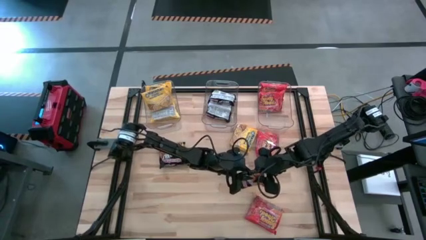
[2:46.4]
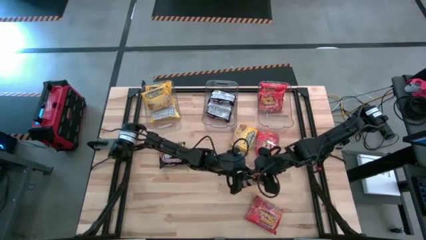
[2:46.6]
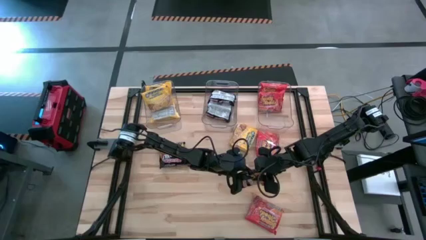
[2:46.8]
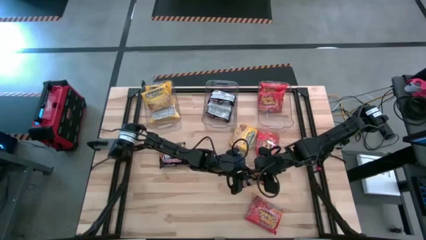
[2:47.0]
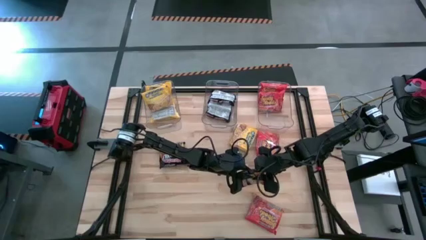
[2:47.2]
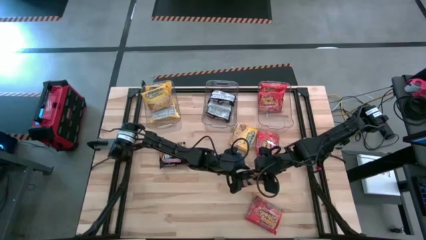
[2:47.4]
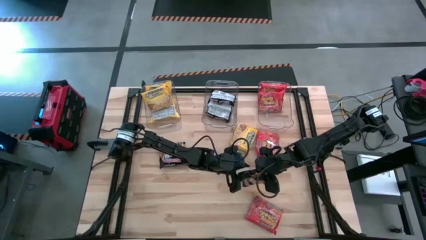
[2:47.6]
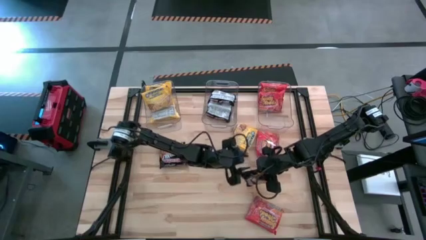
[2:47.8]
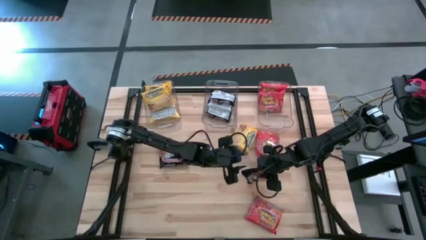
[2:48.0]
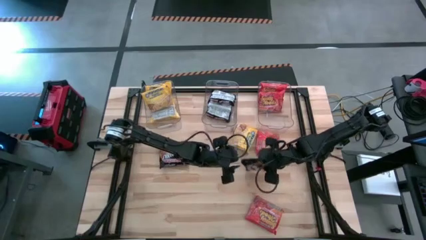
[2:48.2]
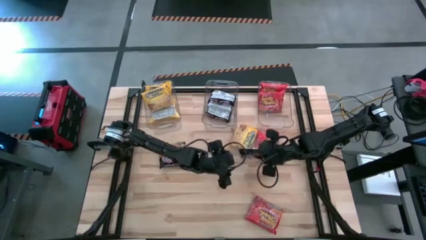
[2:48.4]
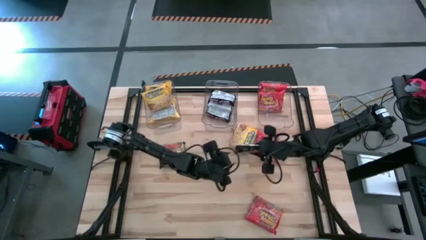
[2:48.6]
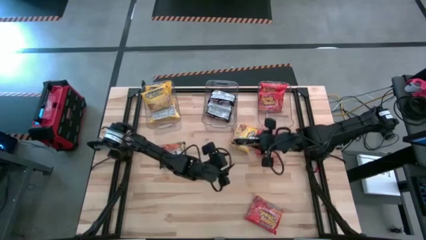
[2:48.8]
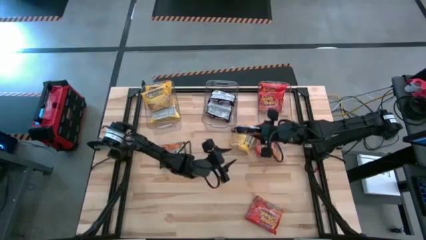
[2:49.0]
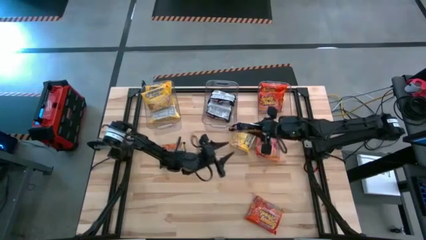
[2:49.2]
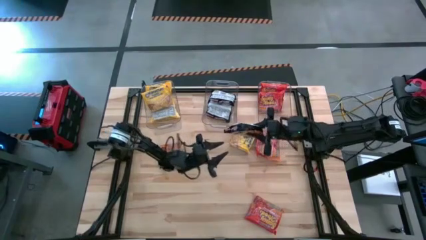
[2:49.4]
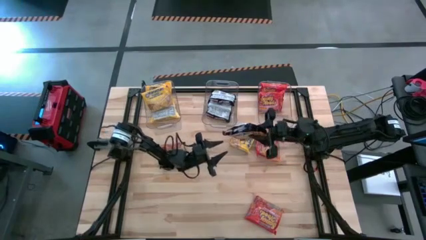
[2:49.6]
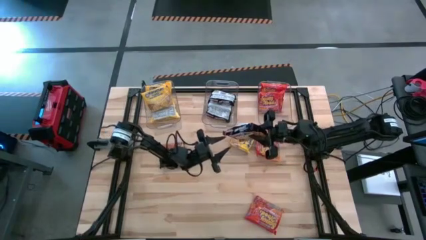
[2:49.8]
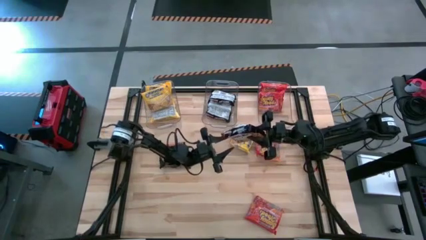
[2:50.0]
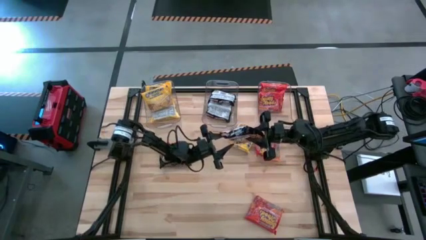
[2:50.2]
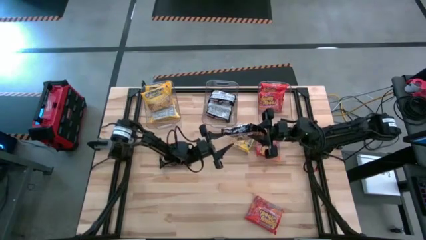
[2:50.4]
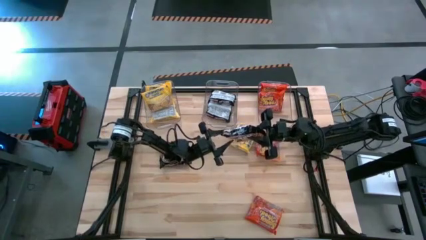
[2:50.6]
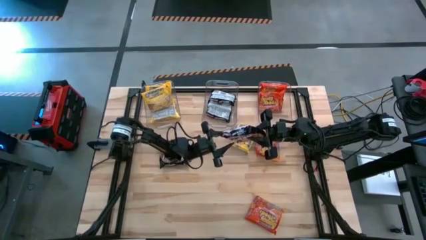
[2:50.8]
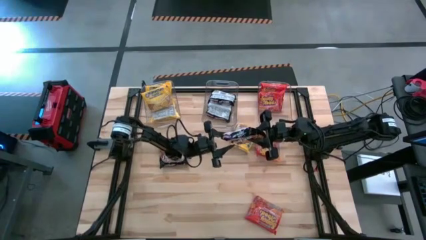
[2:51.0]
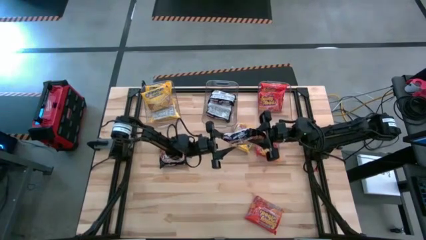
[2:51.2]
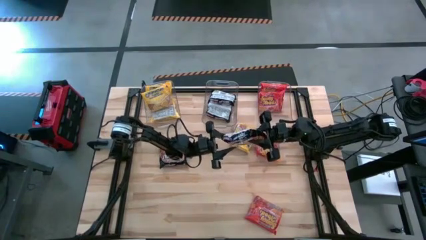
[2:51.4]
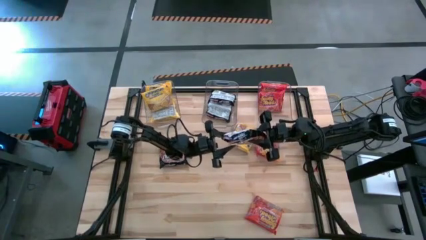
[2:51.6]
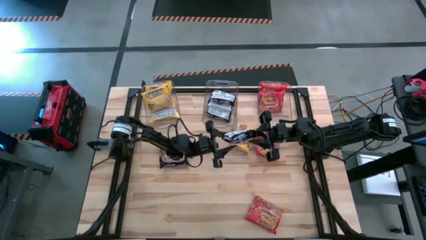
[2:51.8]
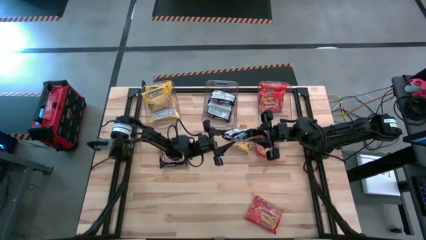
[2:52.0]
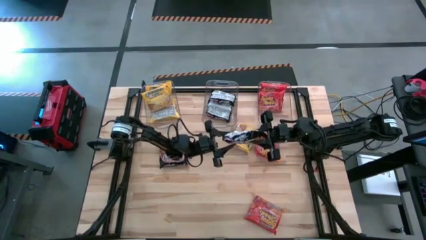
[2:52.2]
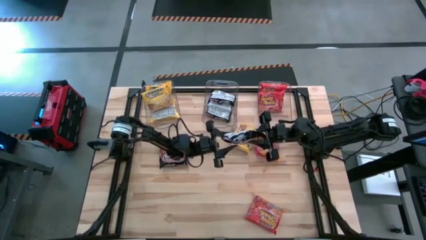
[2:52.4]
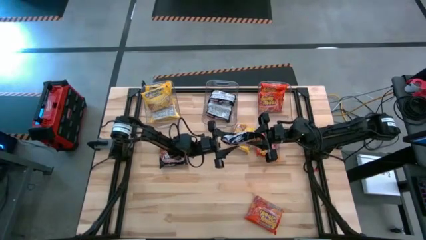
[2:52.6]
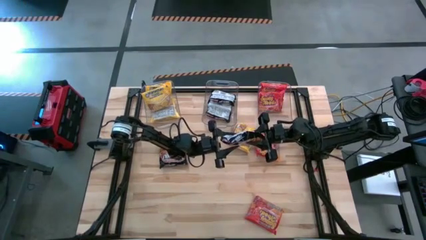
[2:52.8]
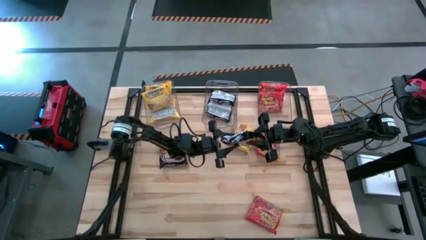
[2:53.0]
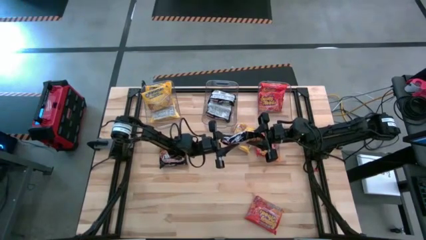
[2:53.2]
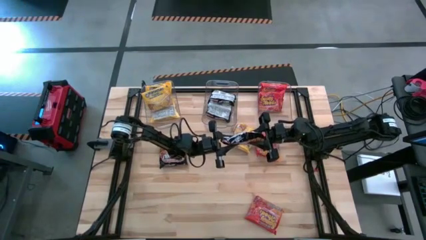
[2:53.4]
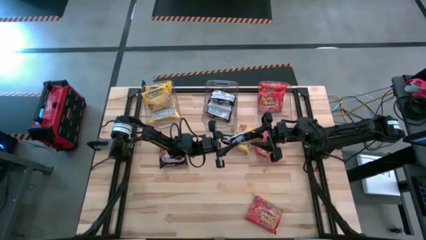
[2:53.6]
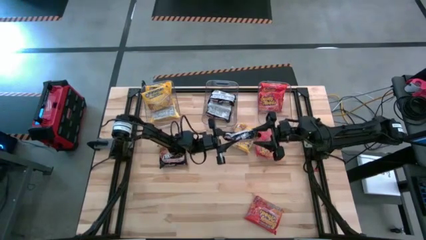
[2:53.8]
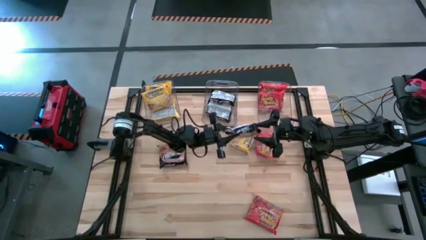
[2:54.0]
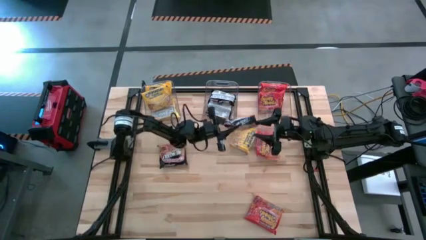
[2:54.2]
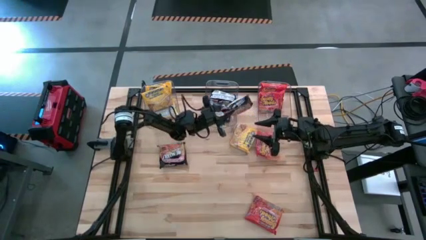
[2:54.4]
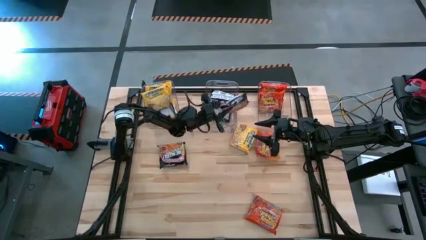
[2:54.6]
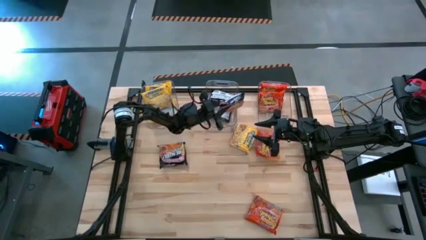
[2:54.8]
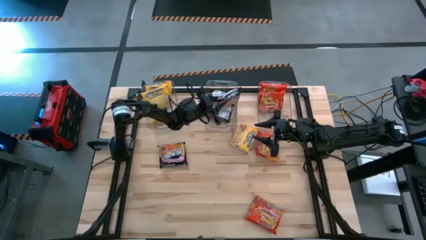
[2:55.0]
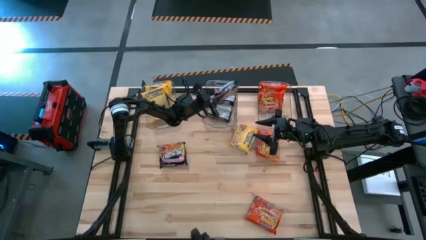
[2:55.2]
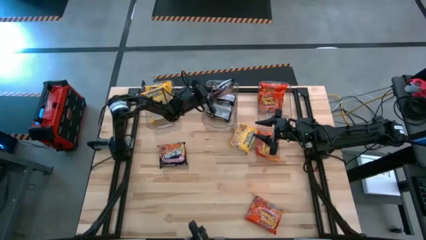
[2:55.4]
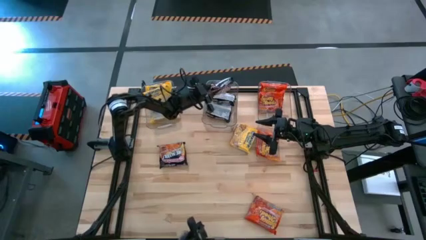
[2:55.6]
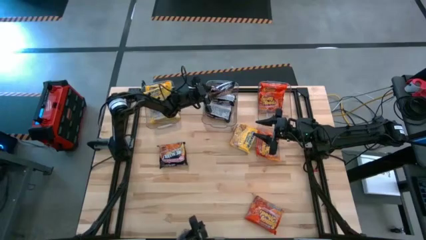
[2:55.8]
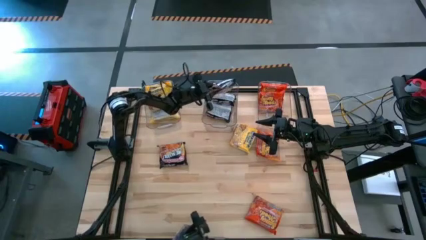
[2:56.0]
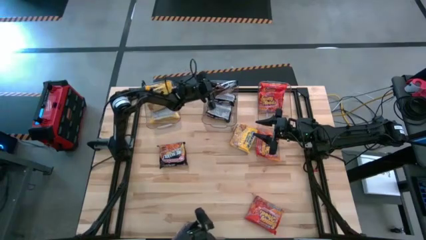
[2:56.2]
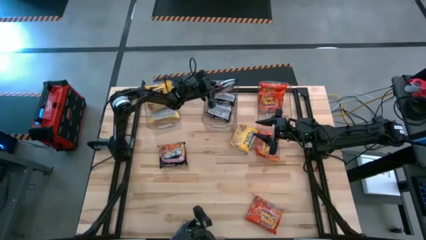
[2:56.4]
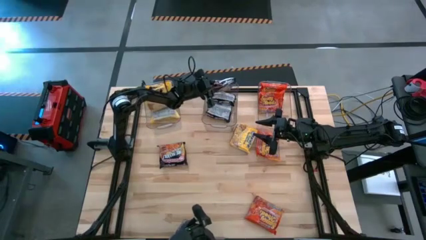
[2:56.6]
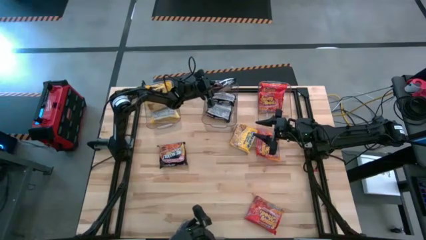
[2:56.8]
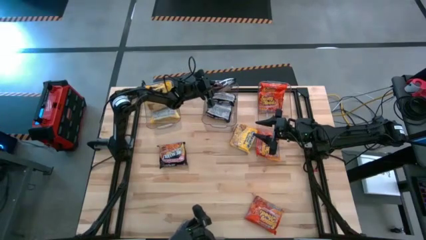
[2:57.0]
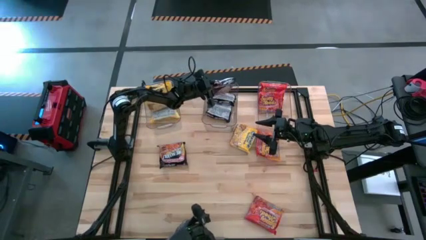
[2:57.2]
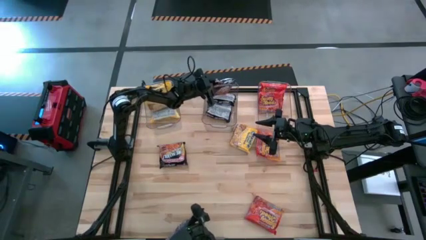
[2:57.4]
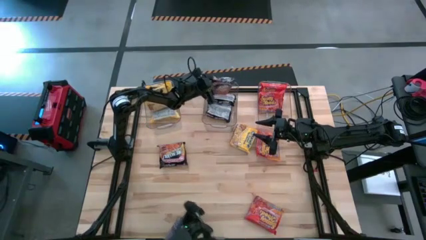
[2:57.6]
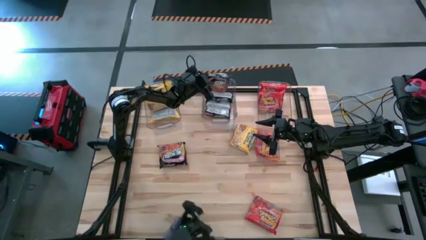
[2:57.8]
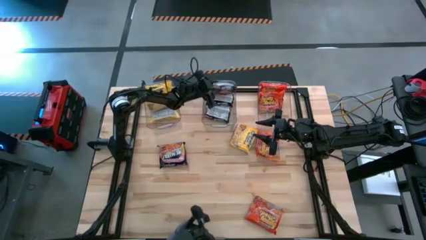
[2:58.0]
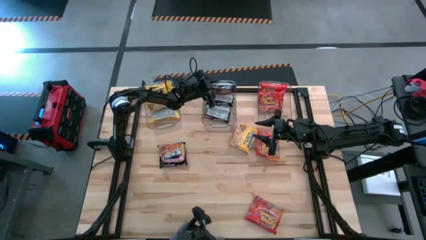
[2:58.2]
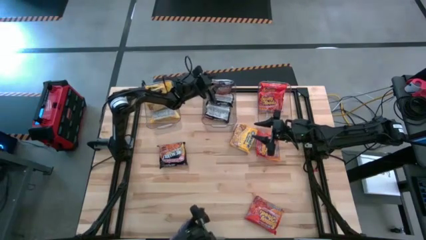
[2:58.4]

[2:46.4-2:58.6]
Task: Sort Maruchan noodles
Put the black noodle pack into the middle transparent bin
